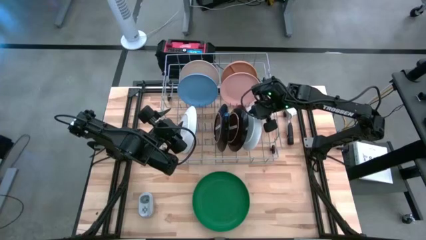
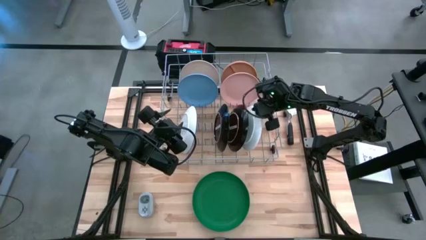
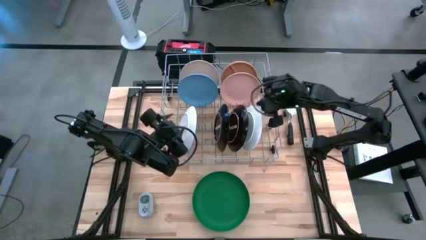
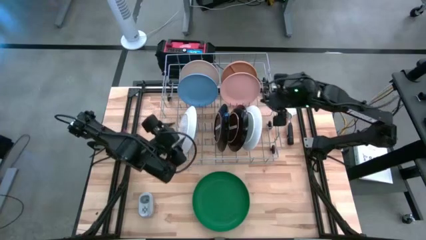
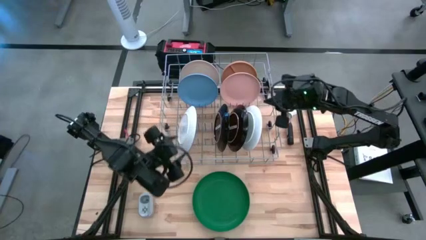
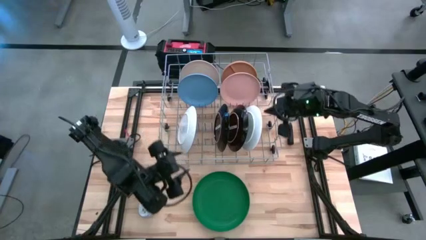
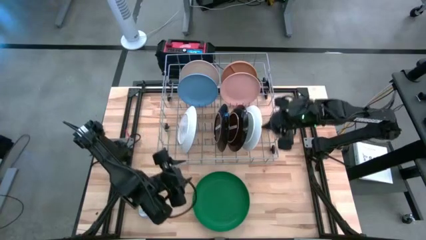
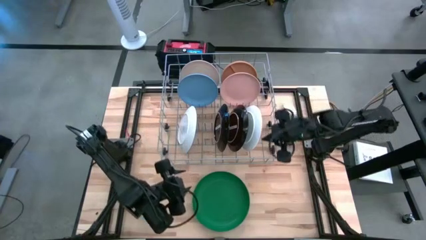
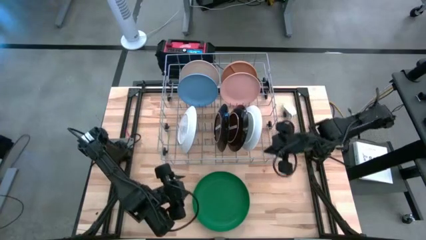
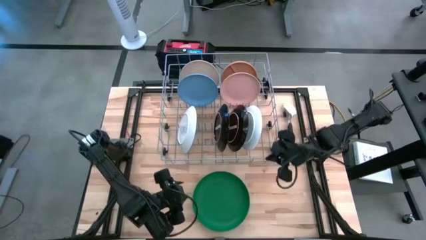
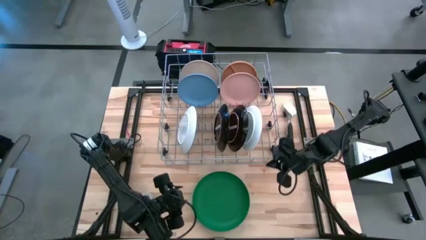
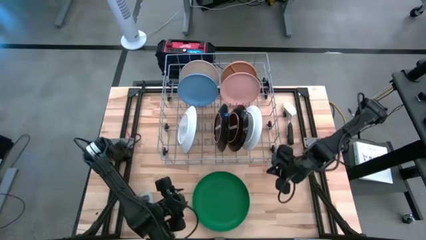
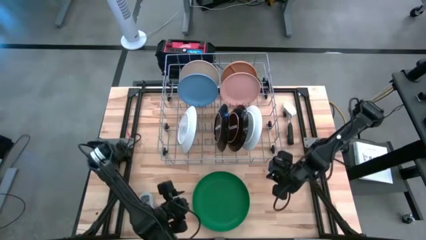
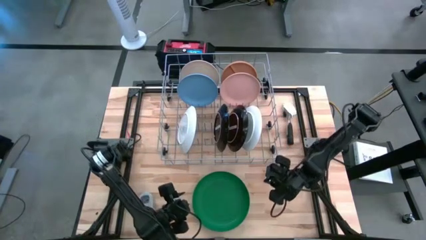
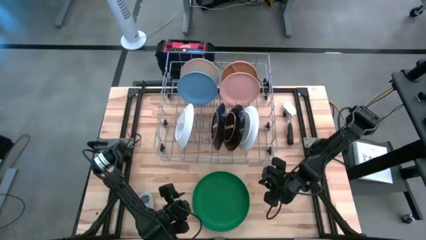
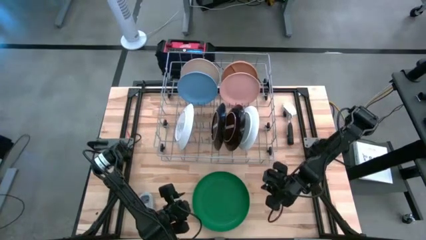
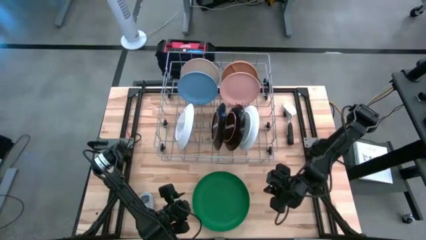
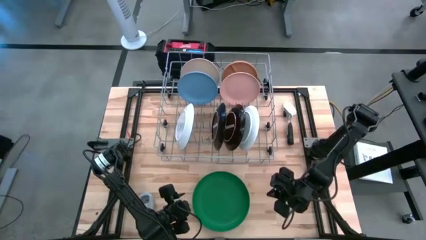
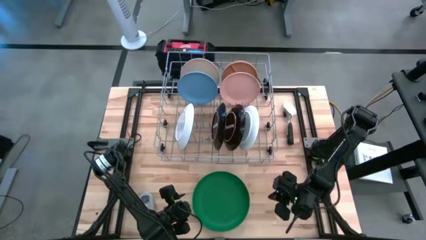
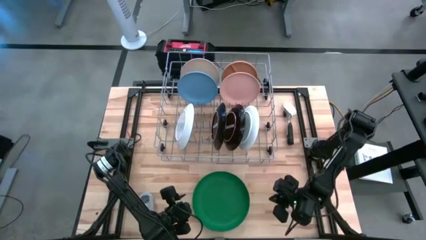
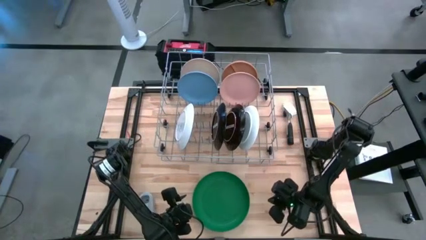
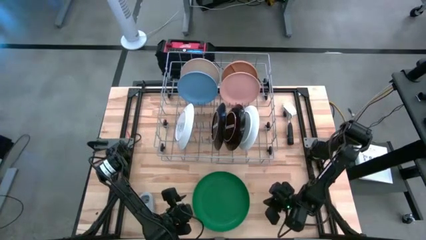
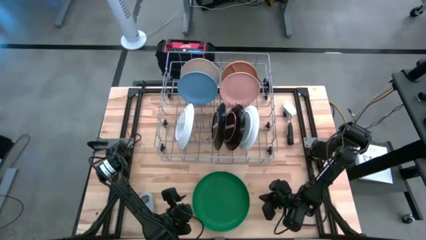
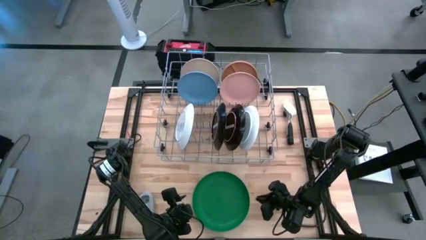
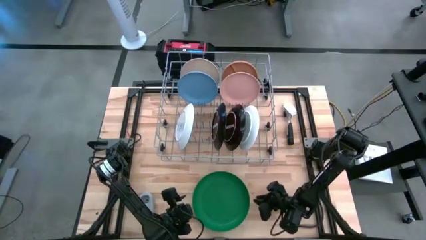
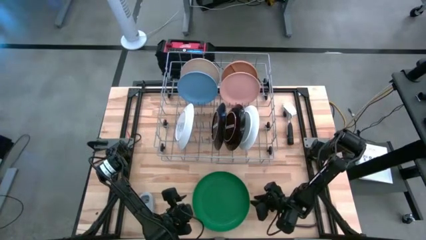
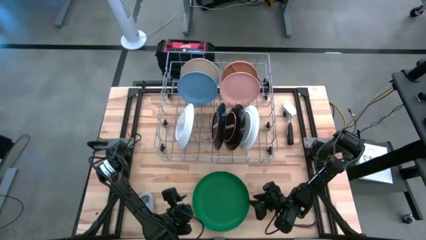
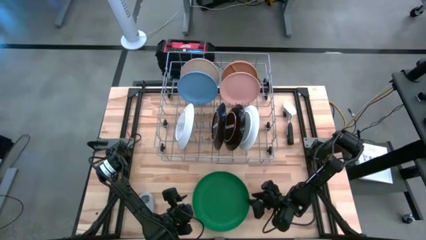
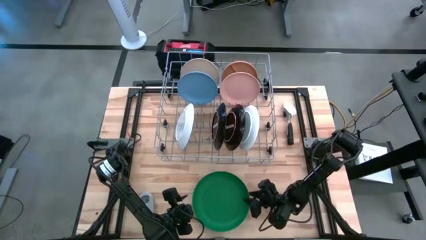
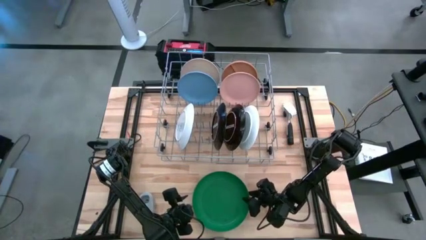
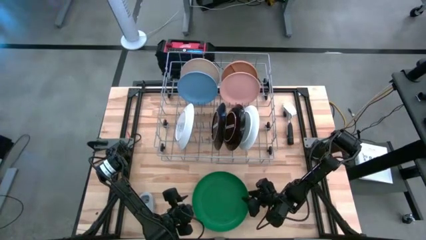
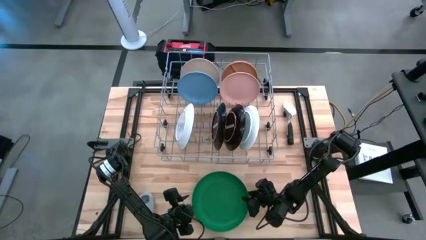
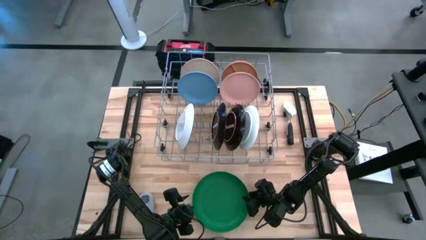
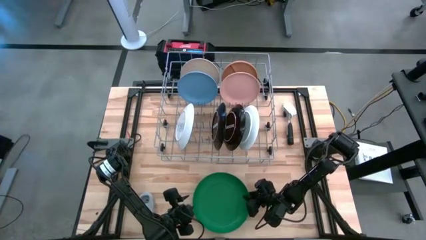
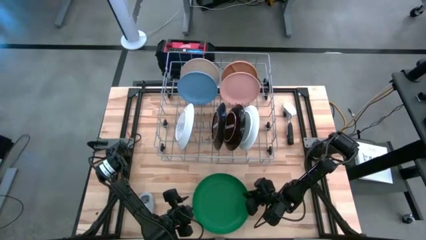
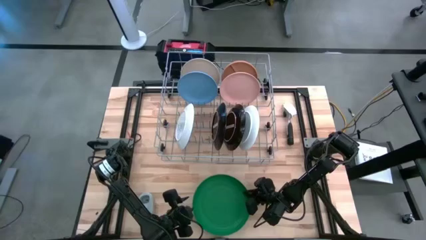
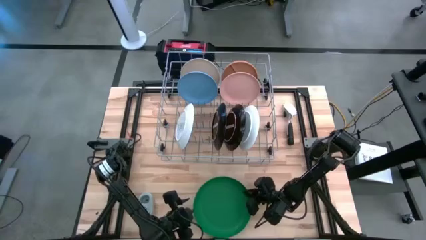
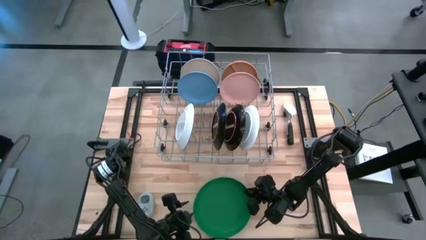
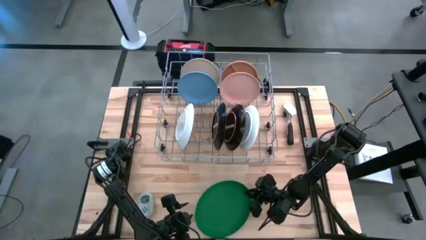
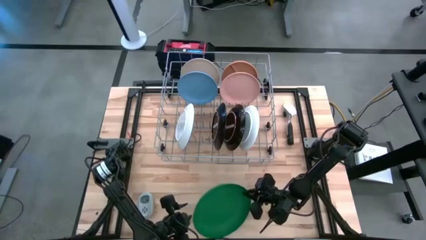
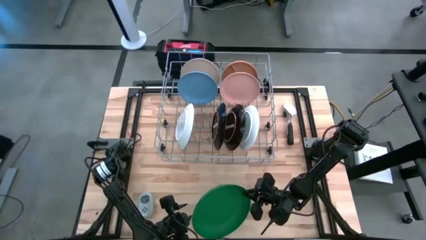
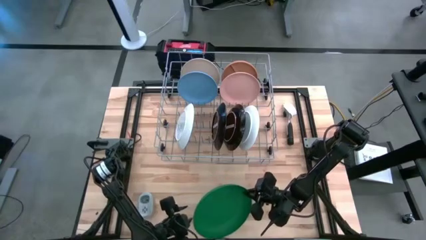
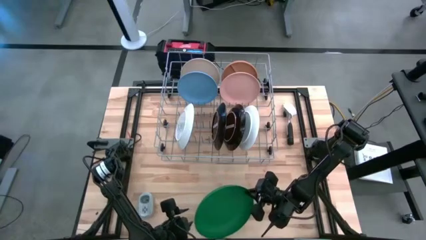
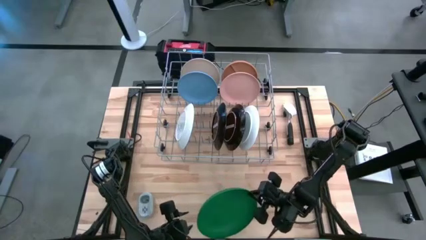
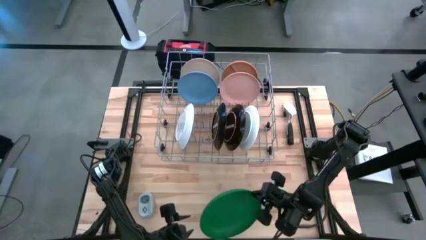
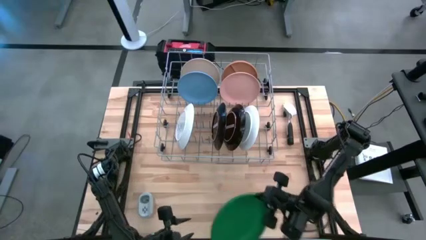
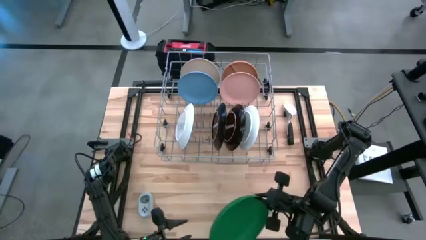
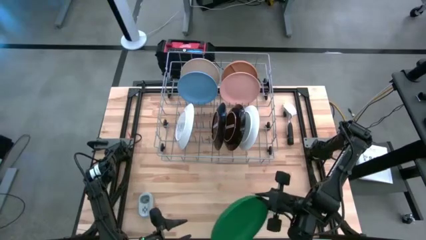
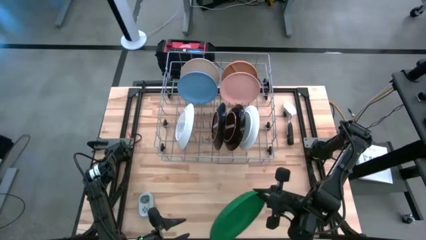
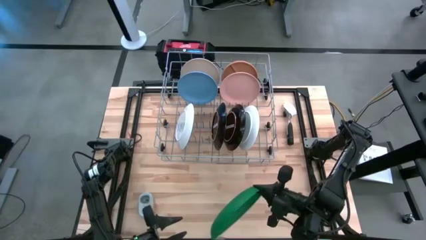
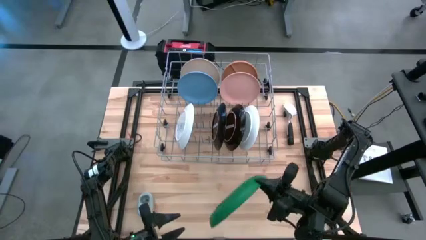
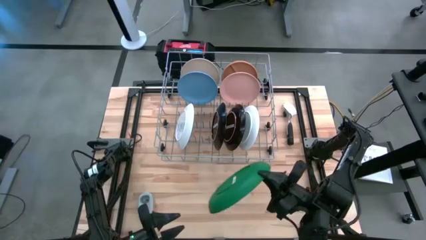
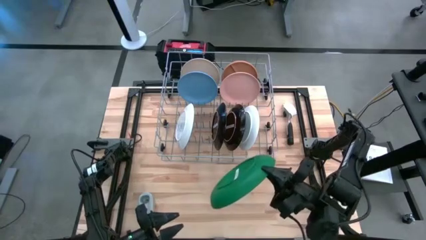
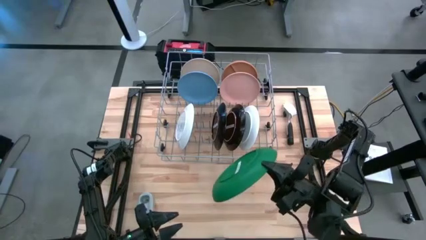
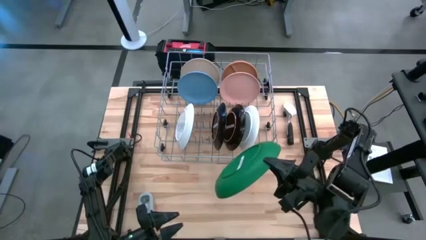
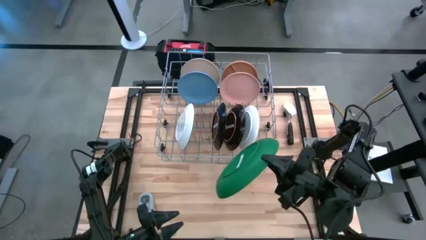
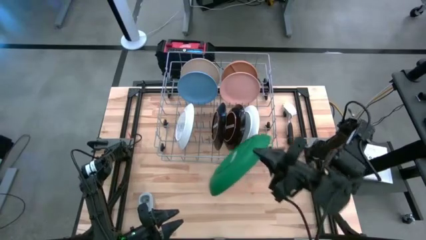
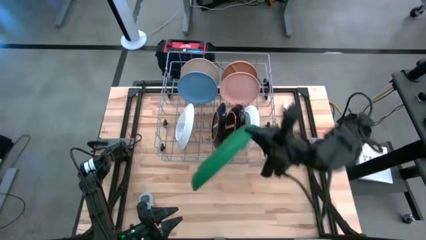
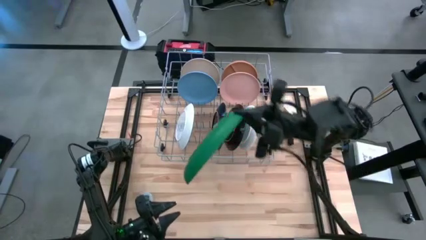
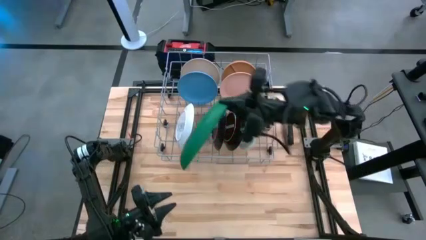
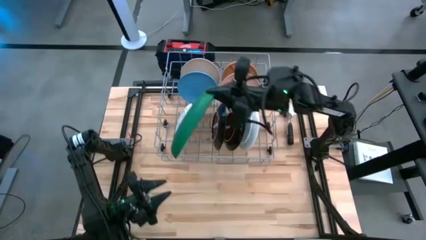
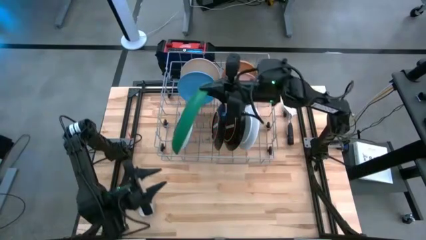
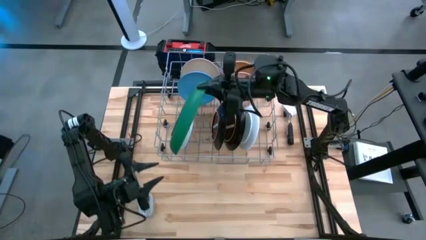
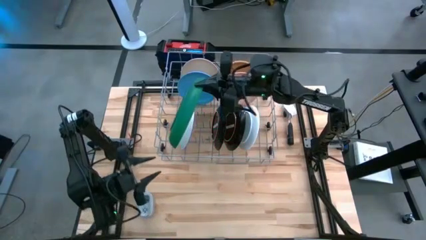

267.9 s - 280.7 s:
Task: Sort dishes
Put the green plate into the dish rack
